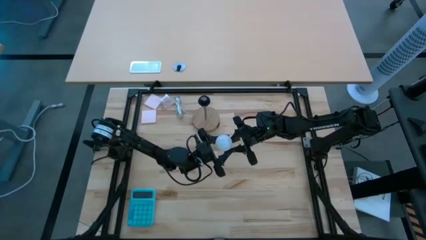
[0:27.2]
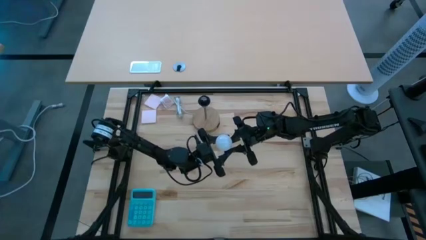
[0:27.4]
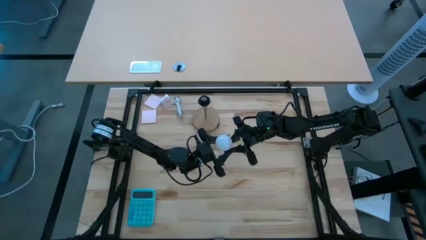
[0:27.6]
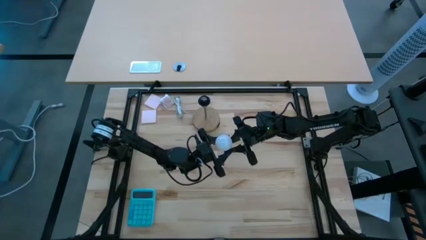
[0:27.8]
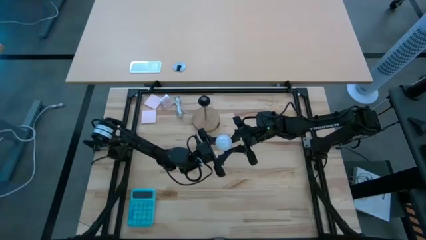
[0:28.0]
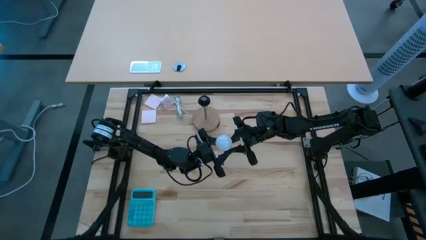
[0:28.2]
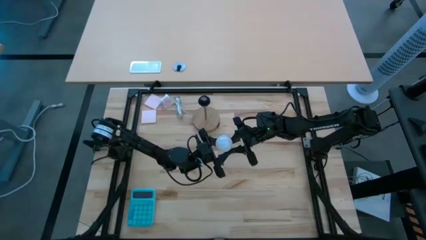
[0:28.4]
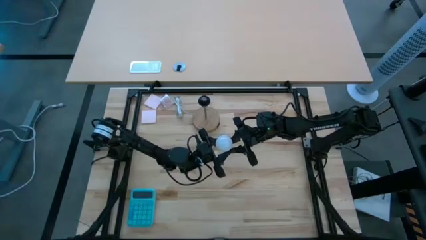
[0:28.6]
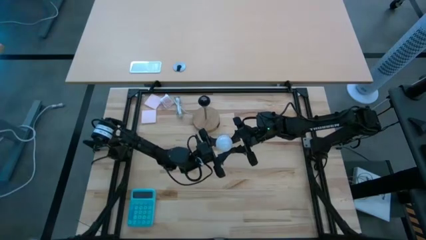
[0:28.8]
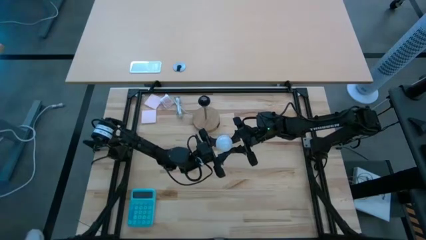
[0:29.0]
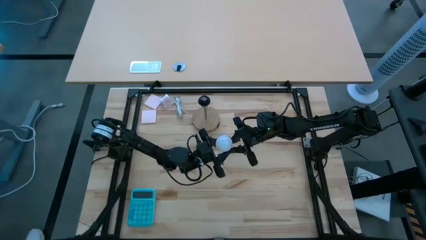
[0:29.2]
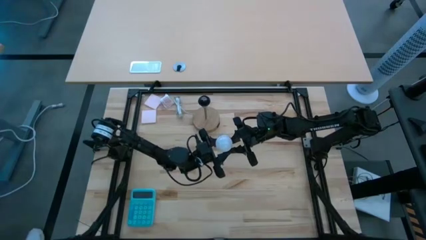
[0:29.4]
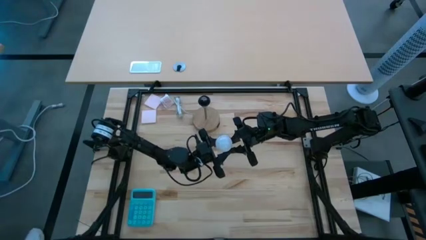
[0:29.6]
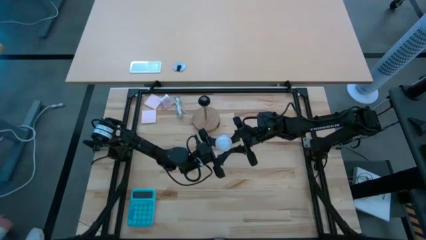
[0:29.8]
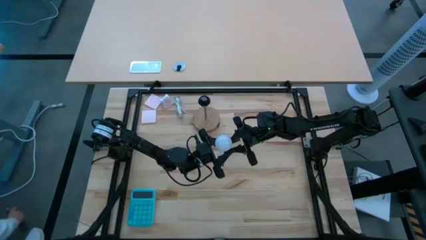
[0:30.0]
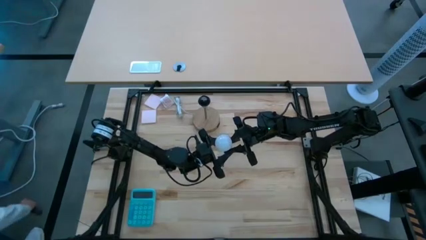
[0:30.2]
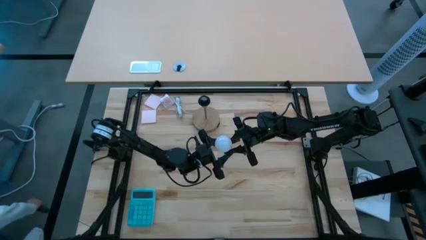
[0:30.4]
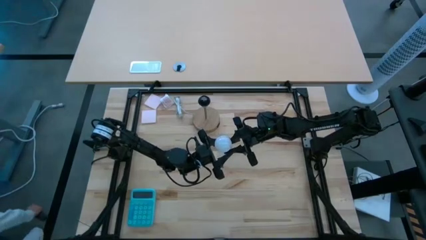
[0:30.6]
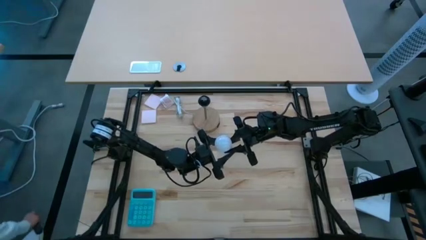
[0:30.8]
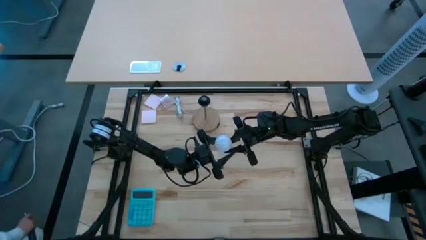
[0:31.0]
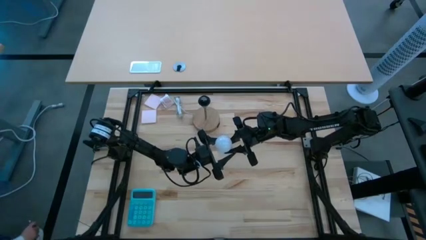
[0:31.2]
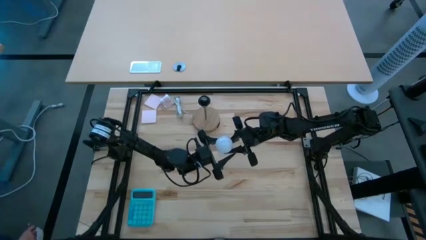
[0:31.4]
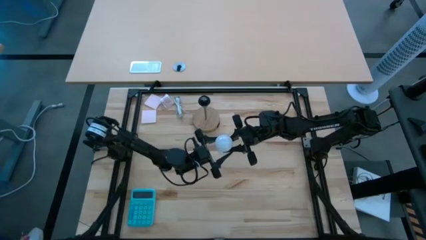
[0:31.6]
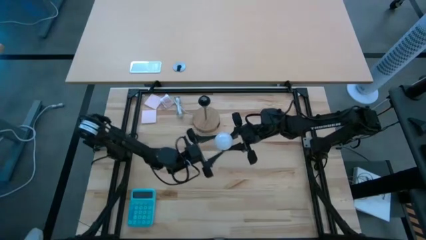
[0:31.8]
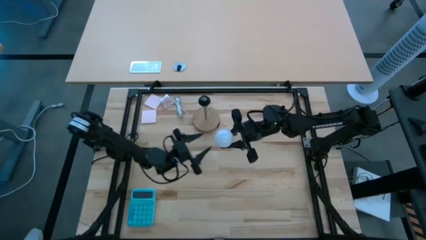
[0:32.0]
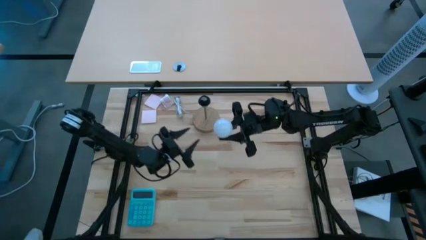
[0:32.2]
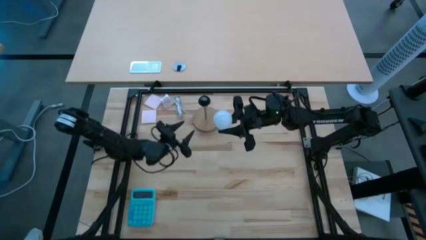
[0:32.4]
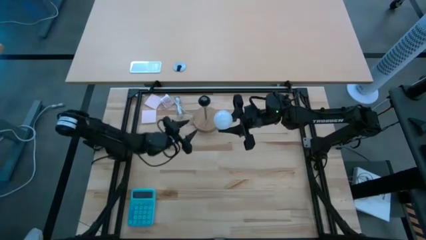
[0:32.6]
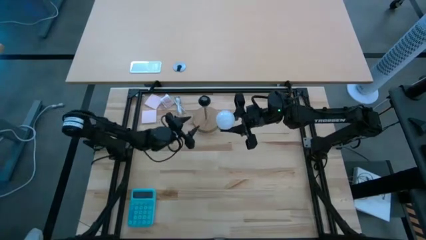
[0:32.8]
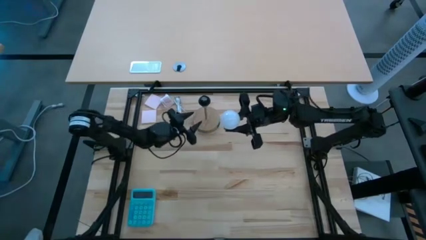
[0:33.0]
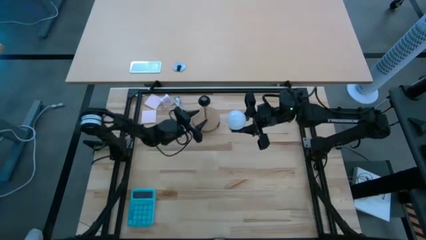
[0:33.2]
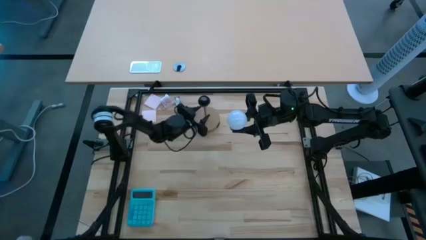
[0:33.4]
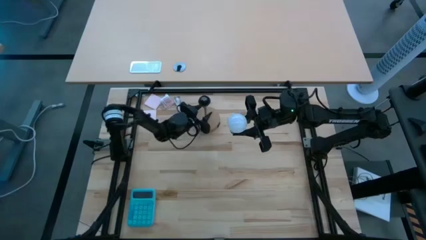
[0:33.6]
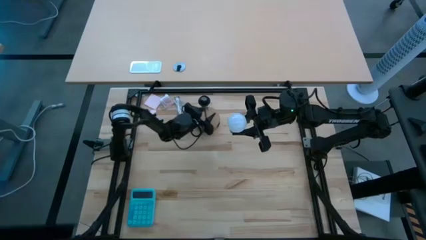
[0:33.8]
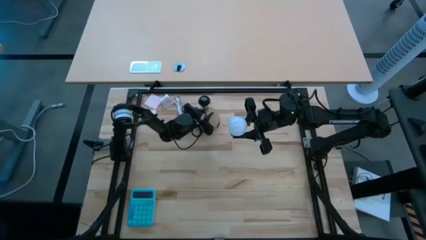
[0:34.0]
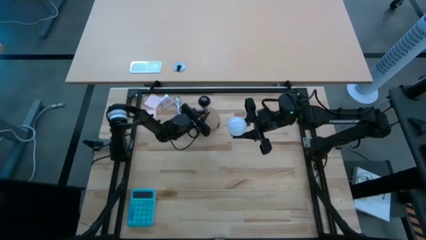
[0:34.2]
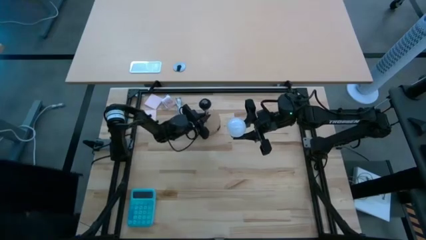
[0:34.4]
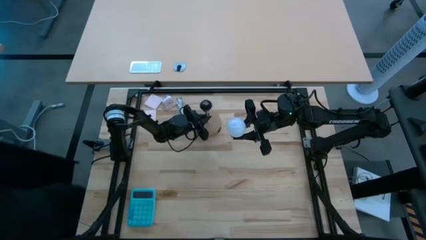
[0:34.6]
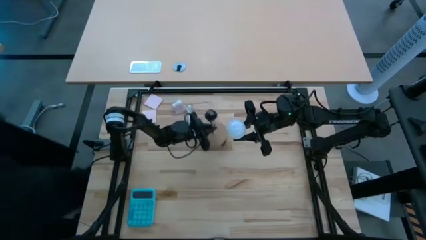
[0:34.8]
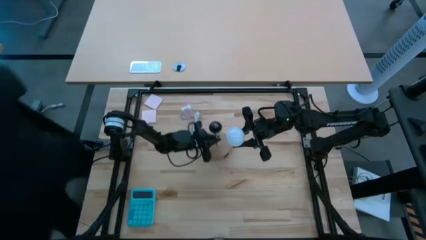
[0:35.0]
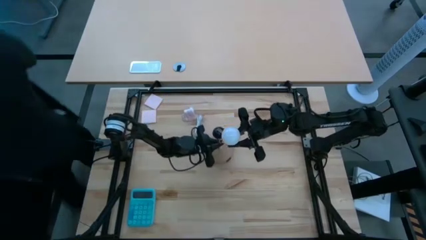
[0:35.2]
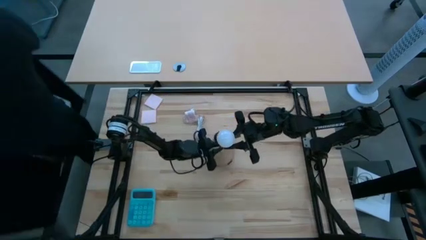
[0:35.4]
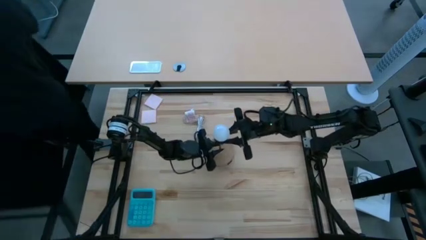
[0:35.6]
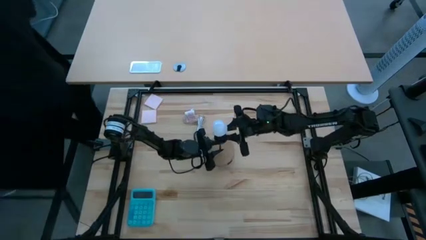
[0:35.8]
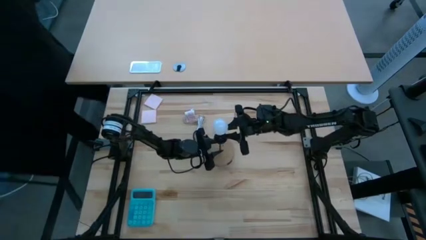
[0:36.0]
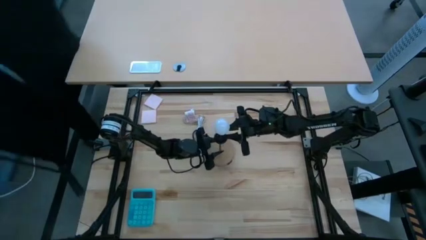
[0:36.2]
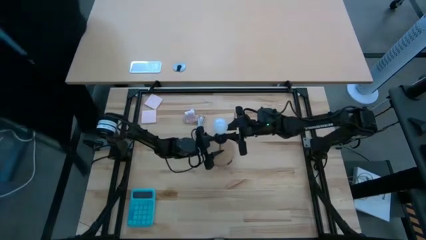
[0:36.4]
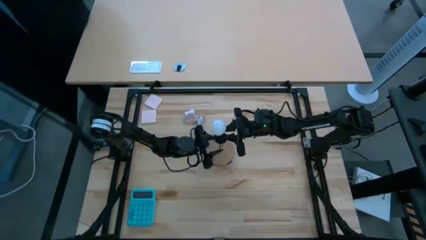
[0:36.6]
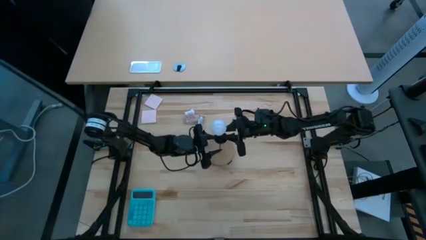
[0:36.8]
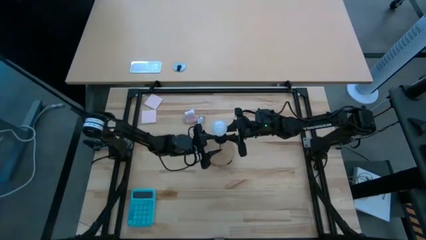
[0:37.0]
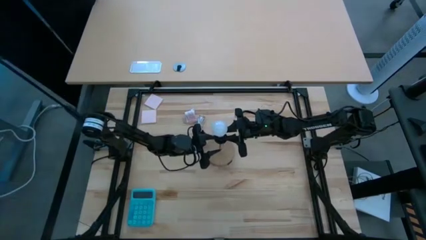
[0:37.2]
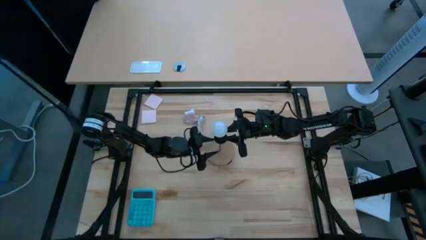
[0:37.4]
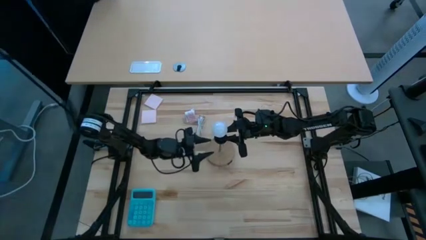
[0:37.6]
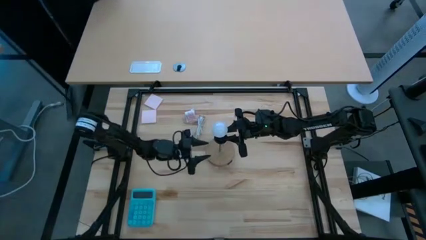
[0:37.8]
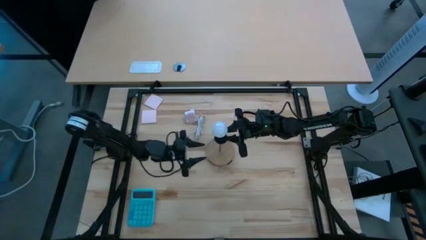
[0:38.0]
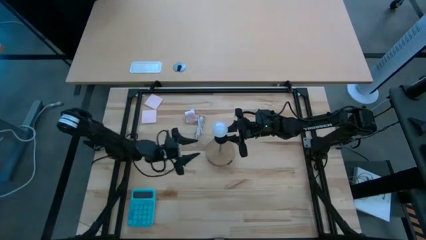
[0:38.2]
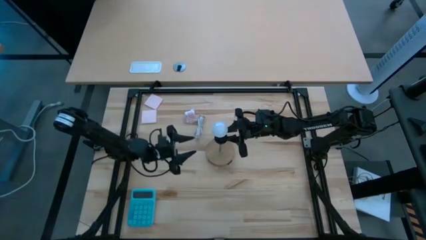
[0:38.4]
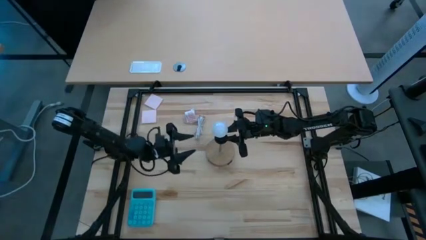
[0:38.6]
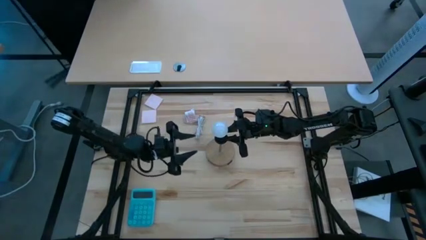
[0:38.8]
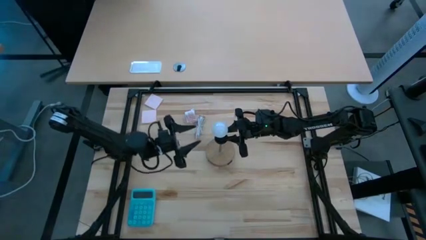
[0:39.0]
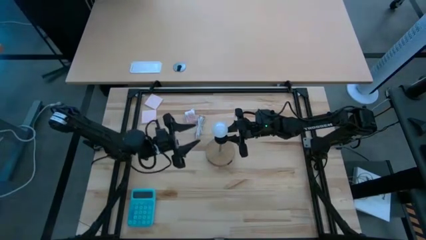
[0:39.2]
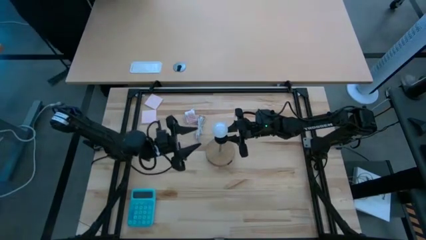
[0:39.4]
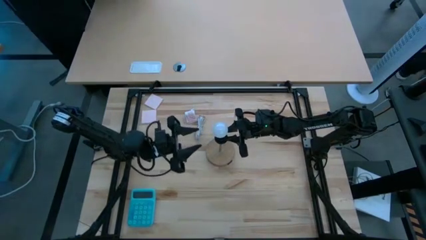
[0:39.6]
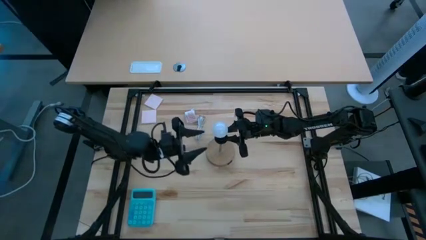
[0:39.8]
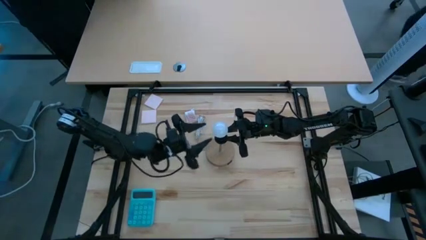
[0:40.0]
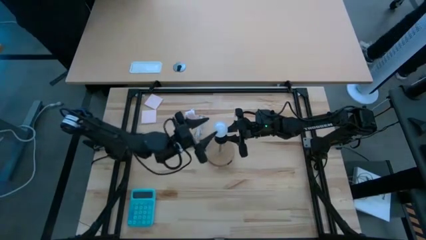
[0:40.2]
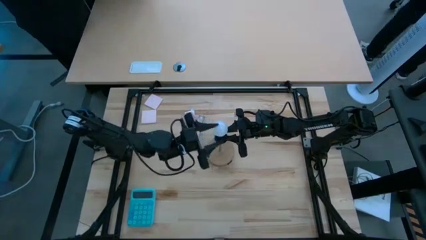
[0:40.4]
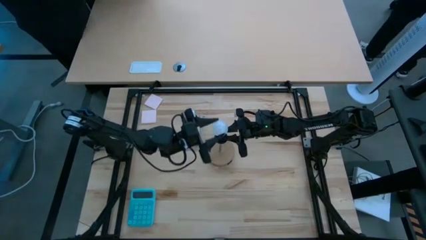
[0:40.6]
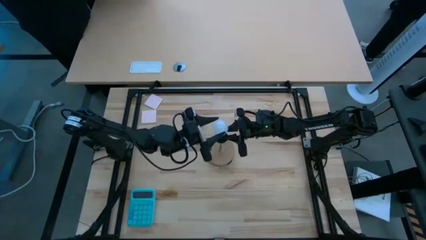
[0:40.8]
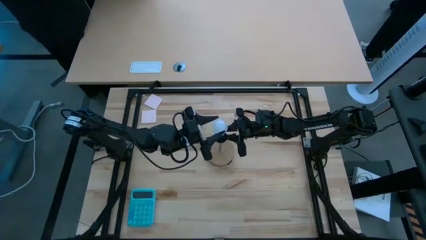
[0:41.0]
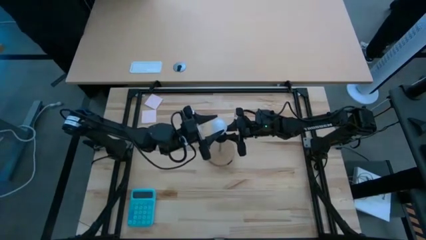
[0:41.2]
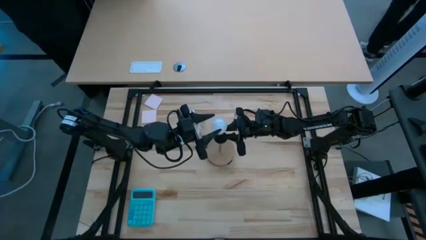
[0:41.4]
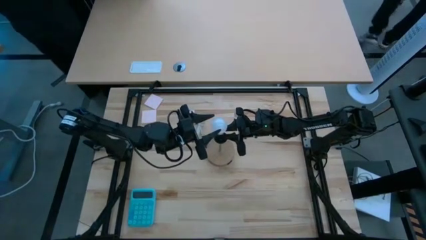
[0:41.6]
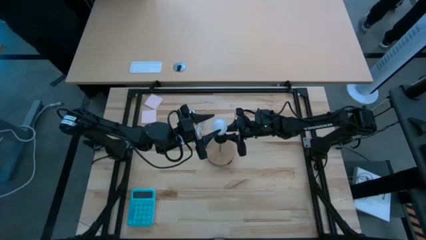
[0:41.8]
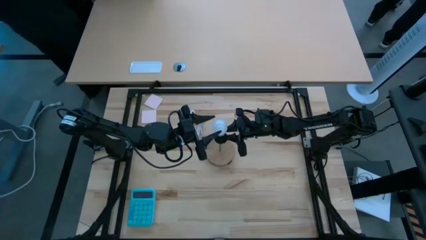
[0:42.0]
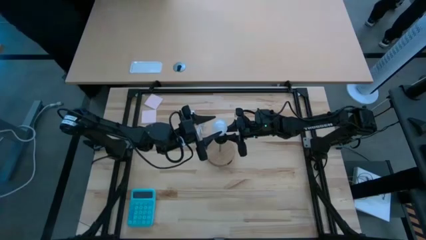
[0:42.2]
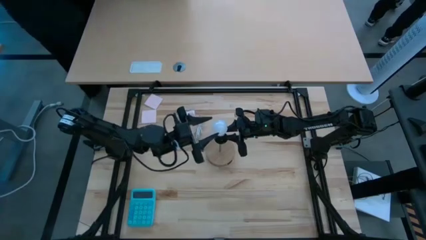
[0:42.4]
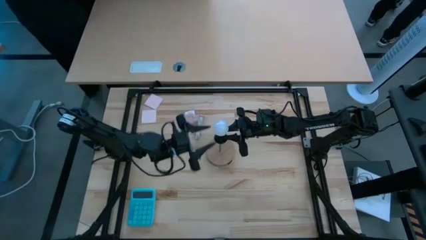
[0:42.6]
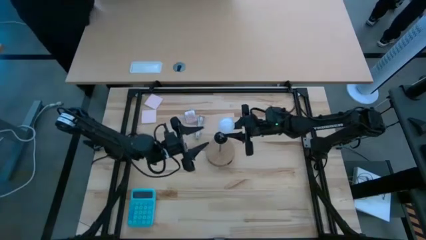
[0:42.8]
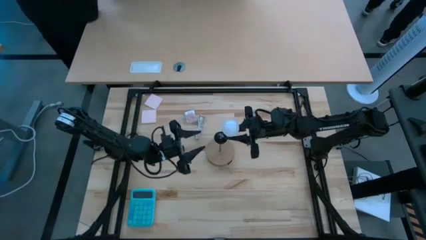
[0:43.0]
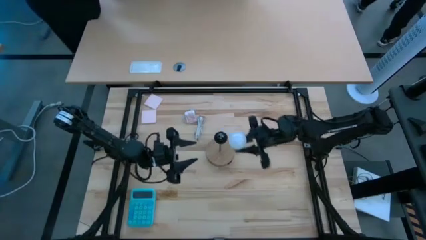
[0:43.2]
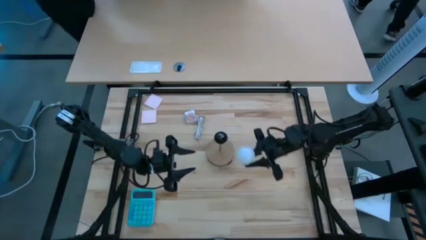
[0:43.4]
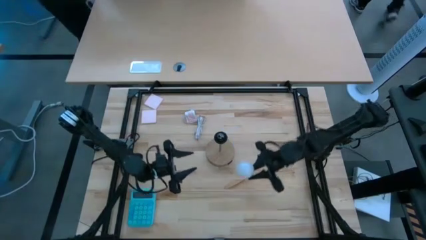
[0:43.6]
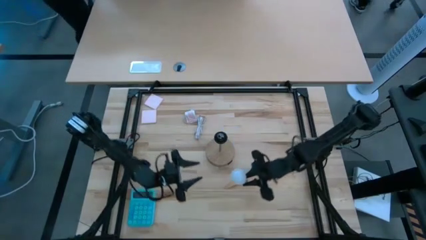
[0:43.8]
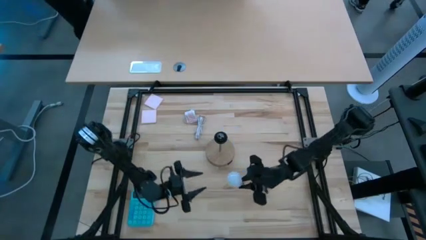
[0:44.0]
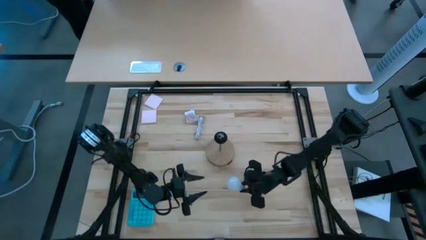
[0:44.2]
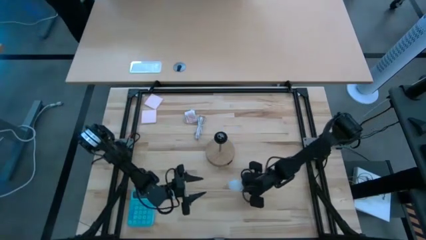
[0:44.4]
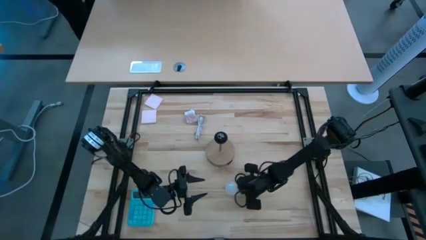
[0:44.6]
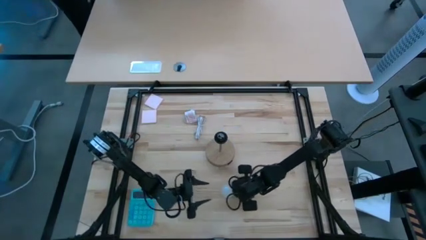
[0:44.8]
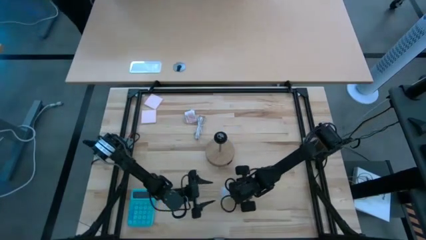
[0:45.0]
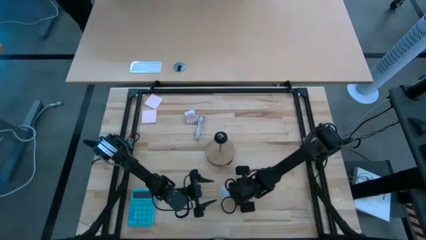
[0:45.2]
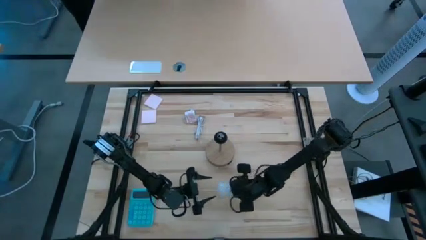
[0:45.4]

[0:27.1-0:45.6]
Task: Screw lightbulb
Insert the lightbulb into the lamp
